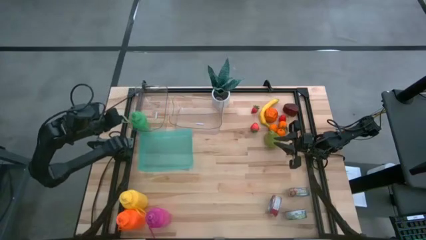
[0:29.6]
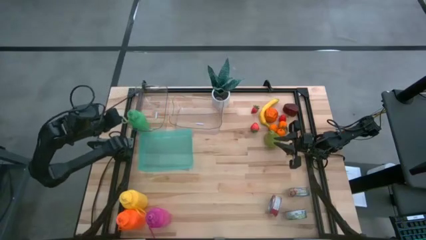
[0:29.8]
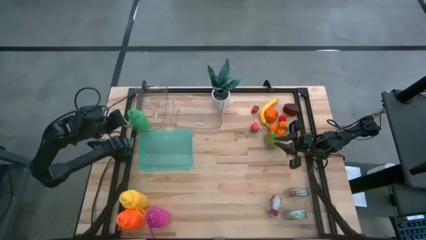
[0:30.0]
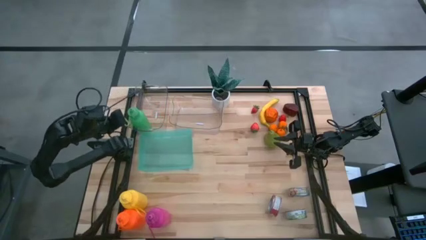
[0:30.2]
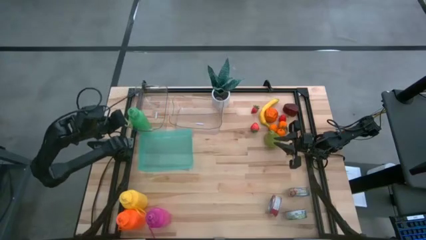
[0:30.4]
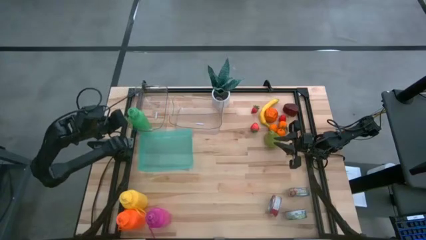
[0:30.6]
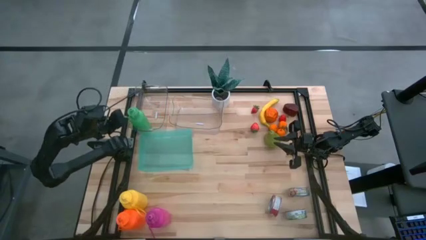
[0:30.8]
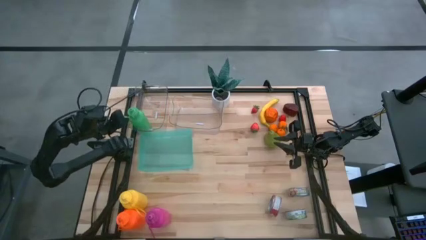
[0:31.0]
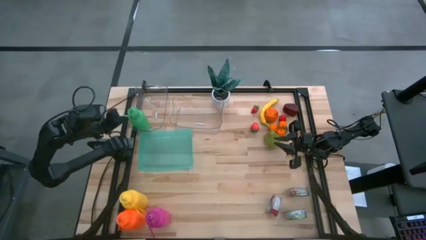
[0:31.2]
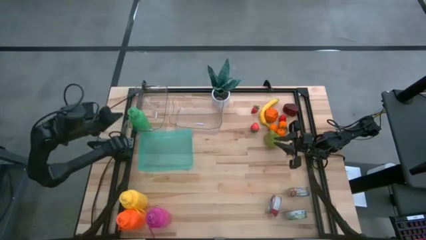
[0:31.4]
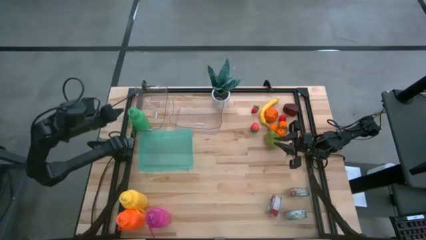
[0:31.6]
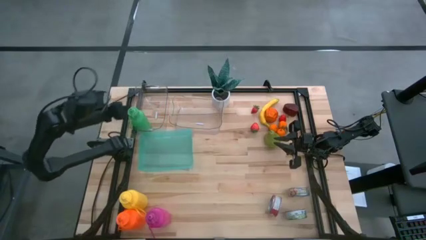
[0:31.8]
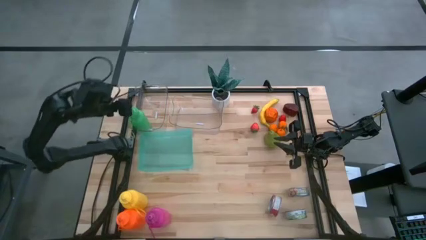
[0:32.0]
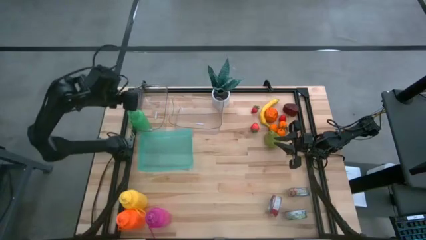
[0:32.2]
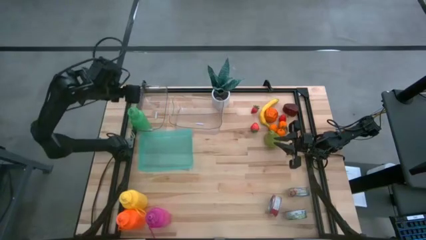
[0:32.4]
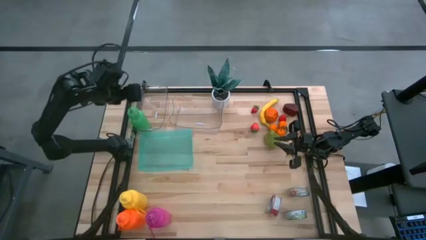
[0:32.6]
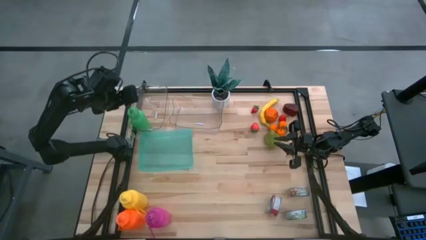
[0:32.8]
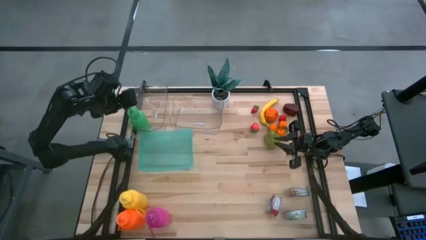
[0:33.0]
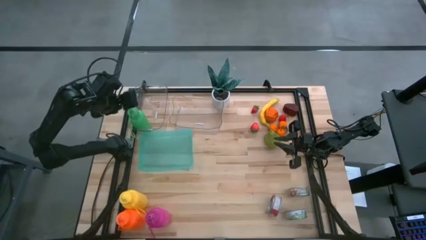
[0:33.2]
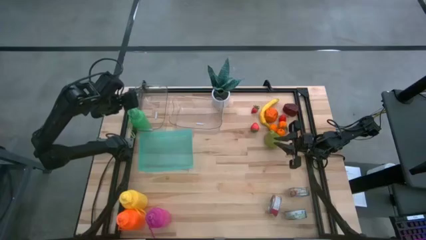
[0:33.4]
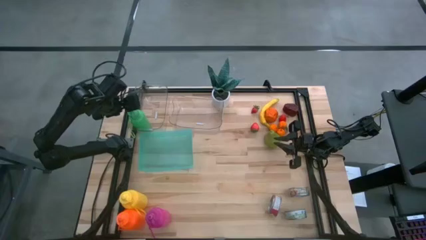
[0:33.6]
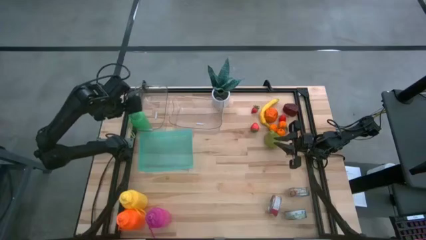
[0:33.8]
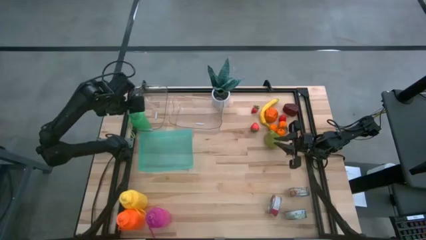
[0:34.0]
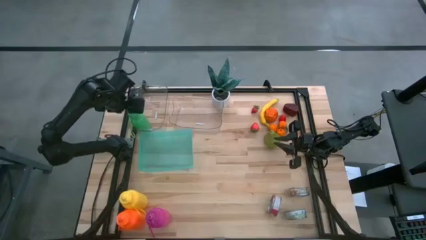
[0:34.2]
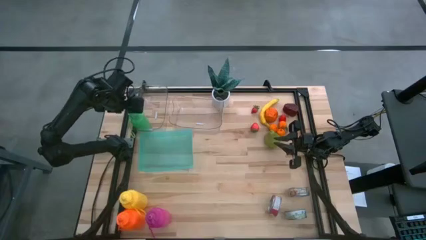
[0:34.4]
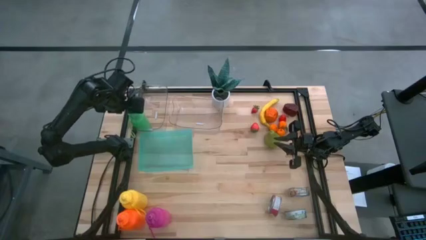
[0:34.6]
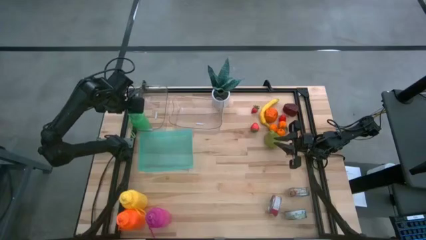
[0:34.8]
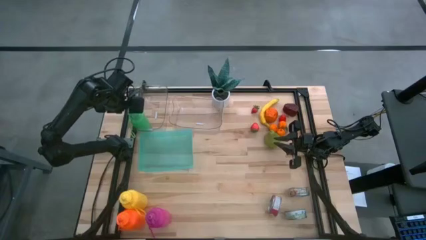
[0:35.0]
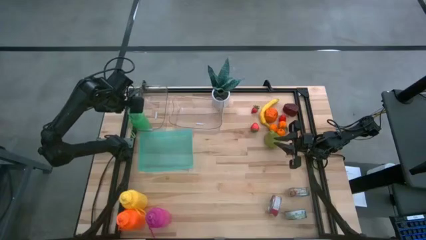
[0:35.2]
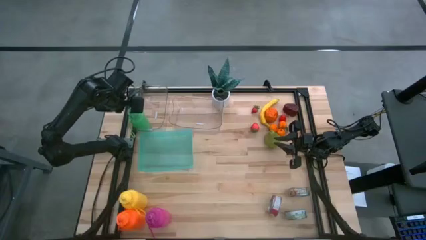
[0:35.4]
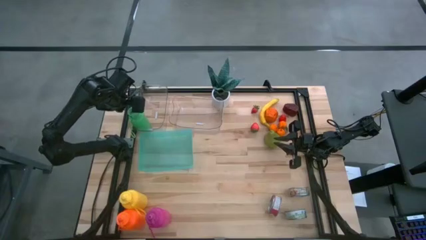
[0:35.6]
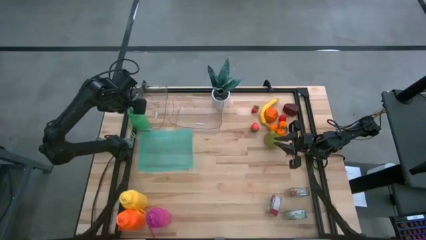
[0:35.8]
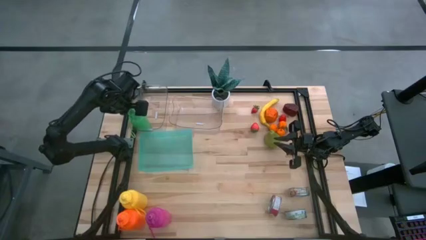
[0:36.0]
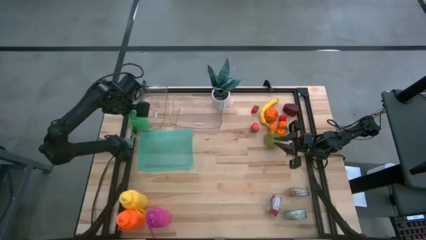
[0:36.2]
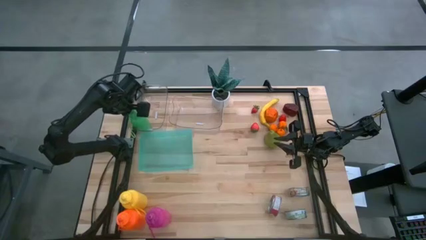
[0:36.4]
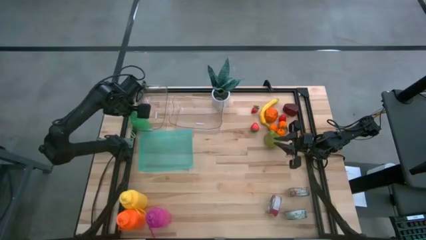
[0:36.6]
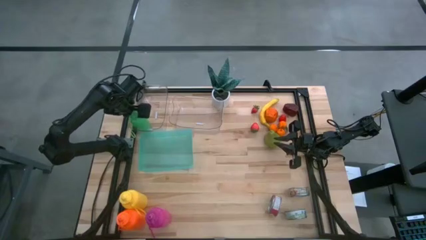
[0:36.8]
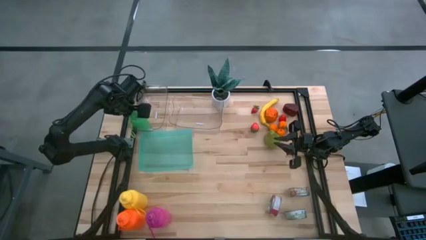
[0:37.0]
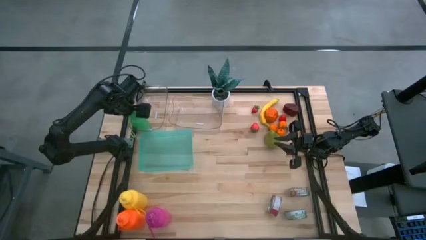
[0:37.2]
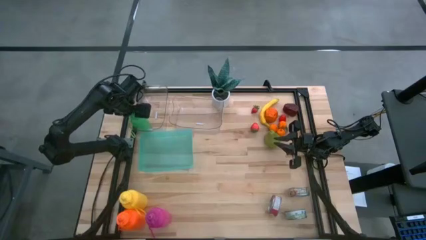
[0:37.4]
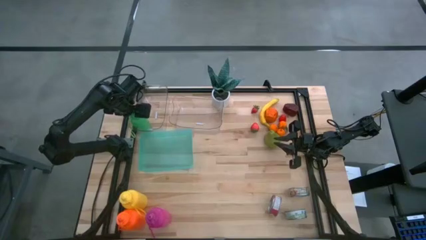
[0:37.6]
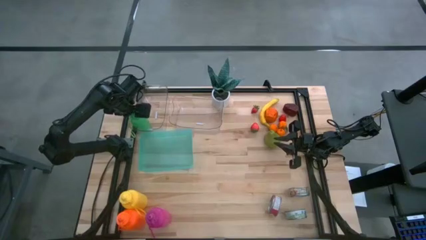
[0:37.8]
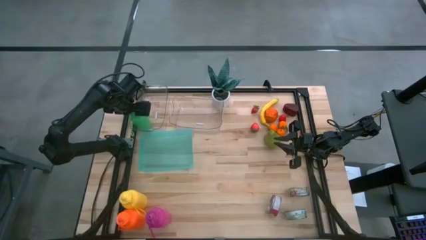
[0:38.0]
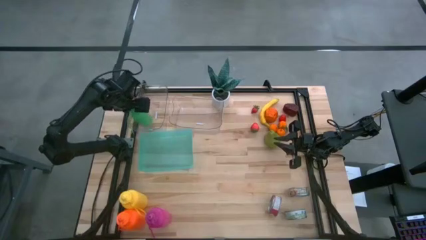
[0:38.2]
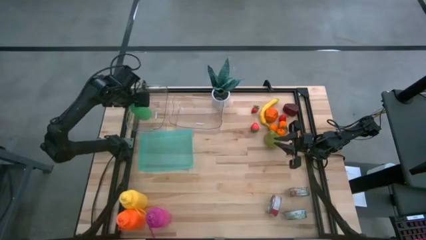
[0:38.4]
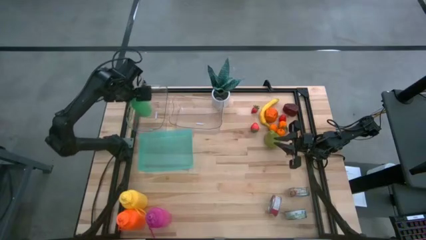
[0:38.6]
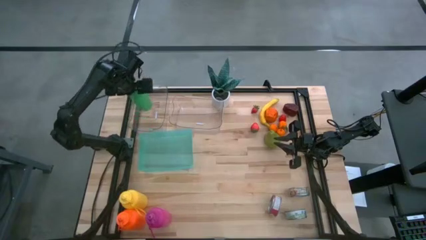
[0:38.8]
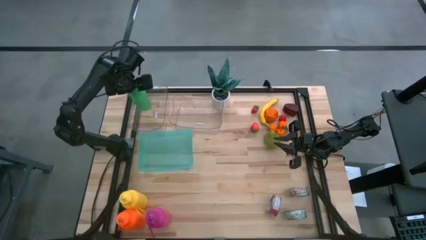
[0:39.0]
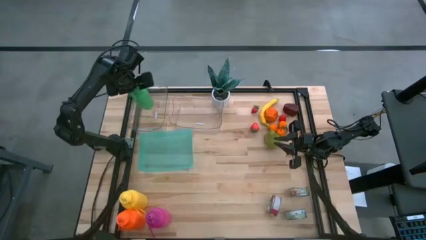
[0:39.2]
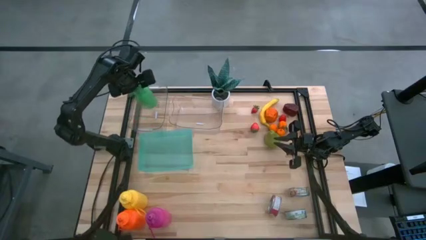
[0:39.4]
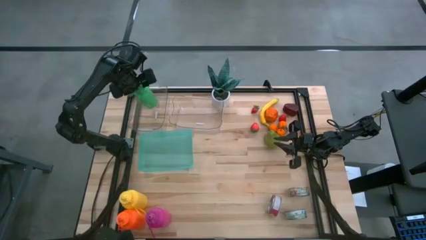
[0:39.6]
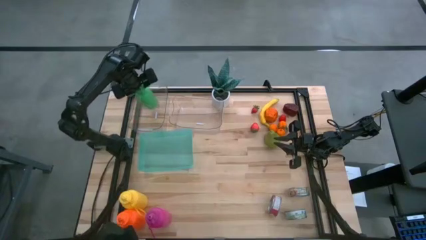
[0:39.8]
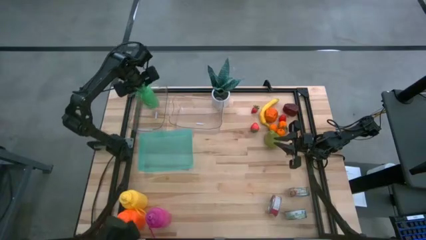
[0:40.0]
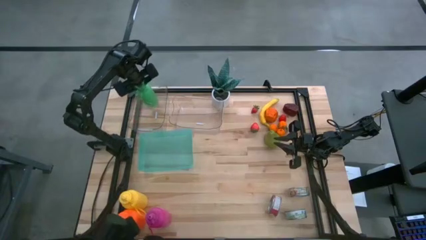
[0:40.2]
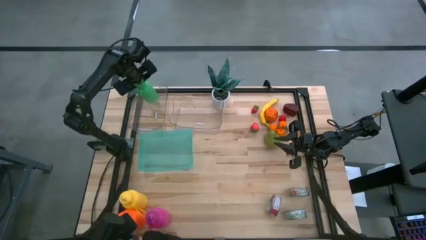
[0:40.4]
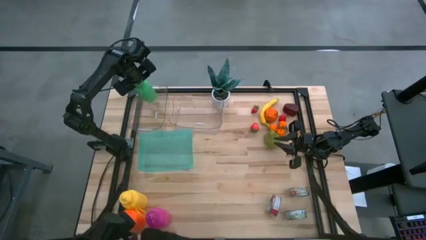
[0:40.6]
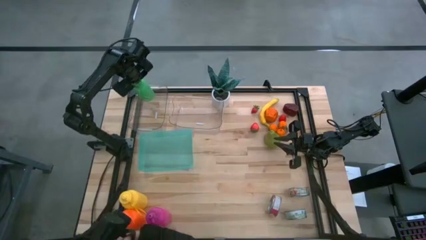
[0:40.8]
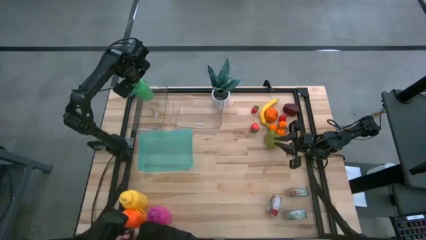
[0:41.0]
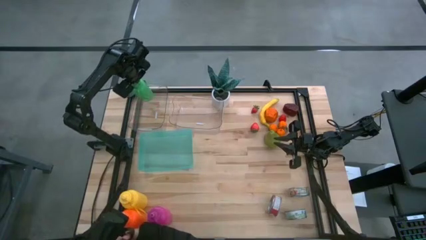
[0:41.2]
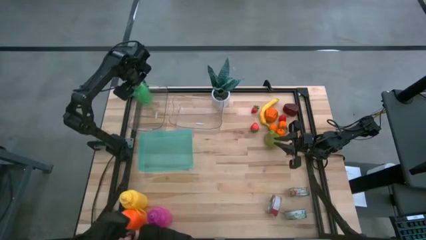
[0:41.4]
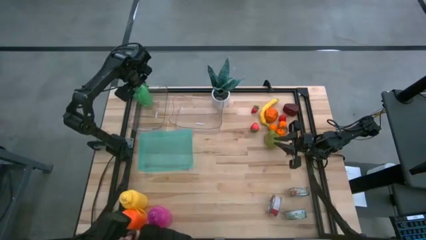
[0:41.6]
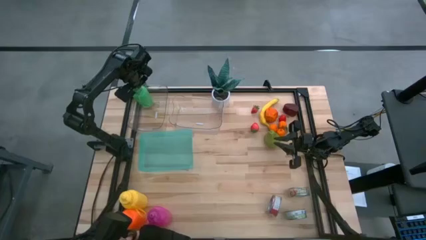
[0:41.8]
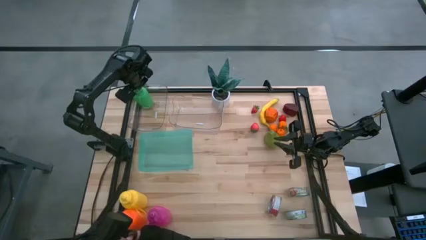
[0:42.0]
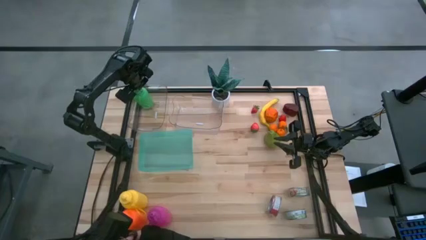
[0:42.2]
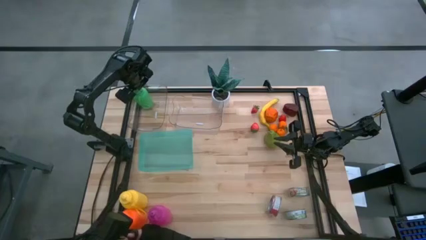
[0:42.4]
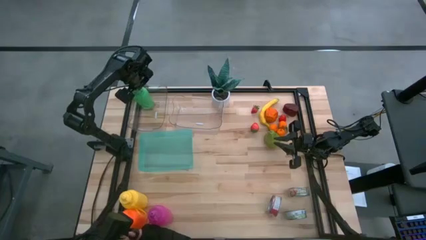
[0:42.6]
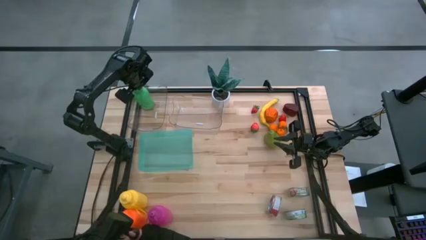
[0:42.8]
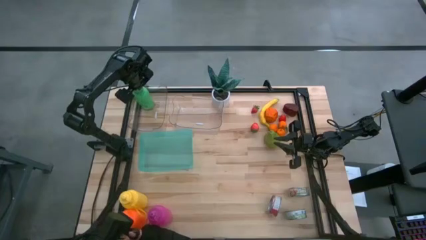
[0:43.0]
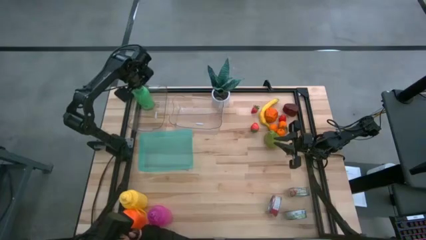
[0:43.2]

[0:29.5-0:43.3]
Task: Pick & Place Food Item
Put the green water bottle into the left transparent bin
